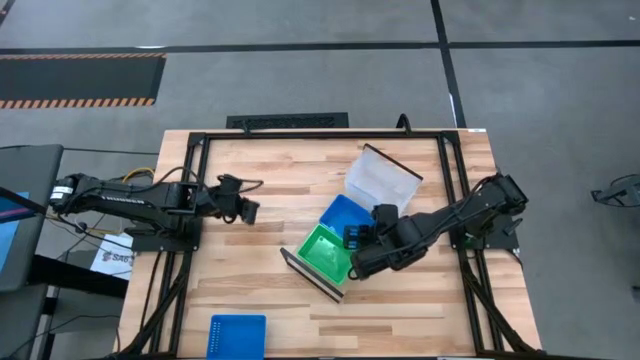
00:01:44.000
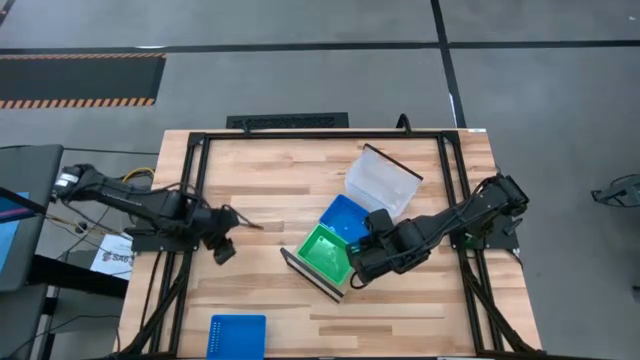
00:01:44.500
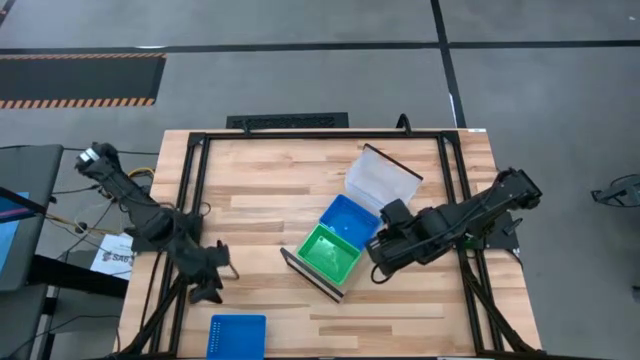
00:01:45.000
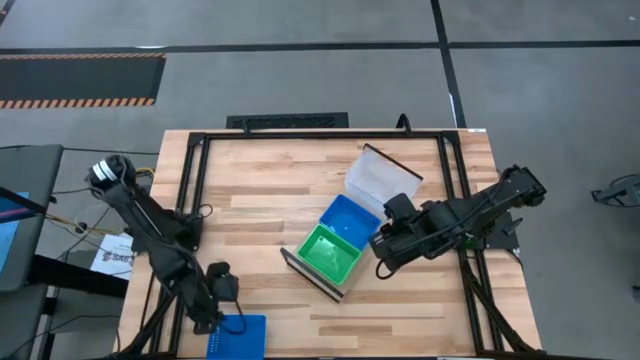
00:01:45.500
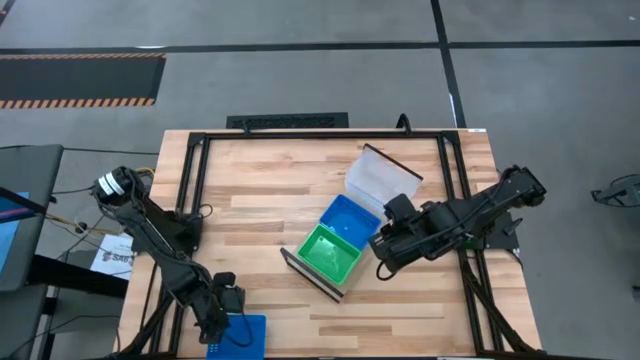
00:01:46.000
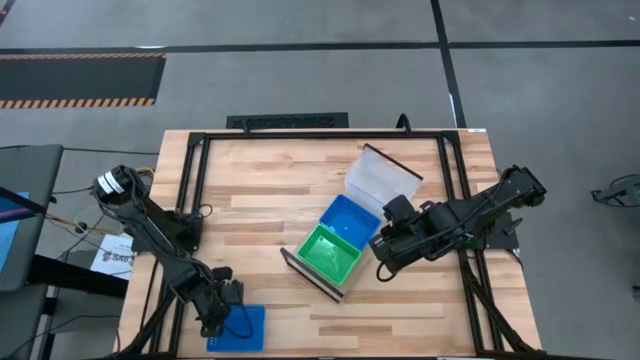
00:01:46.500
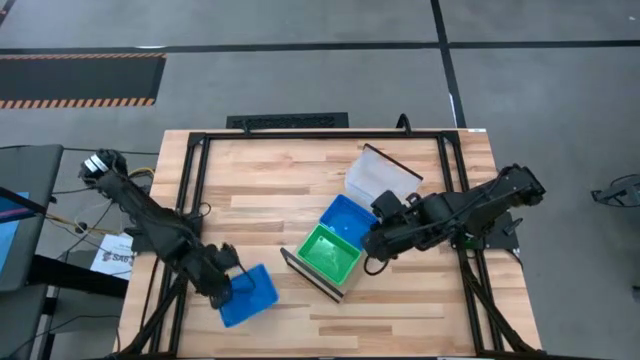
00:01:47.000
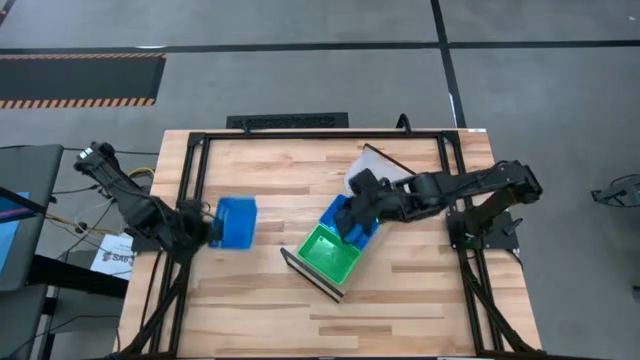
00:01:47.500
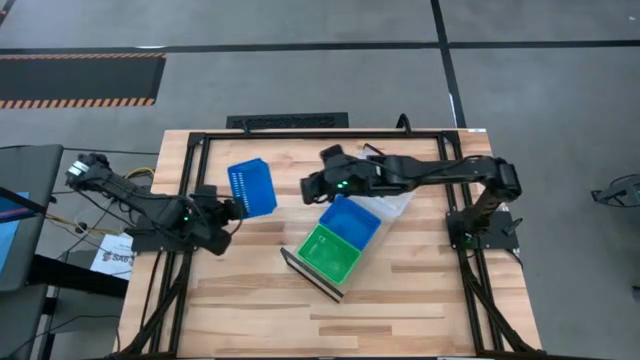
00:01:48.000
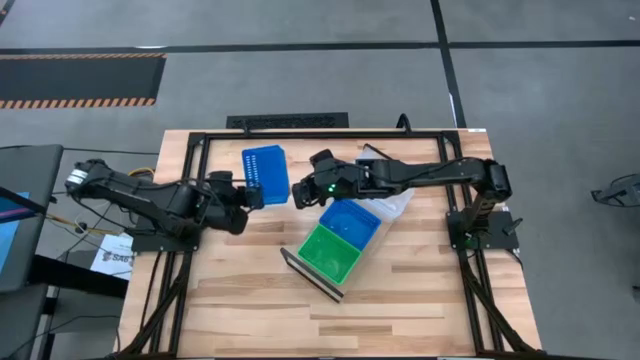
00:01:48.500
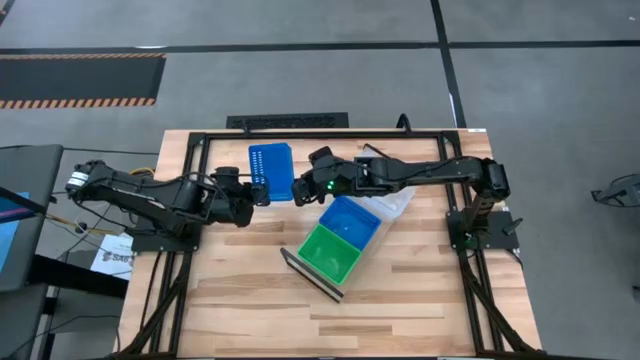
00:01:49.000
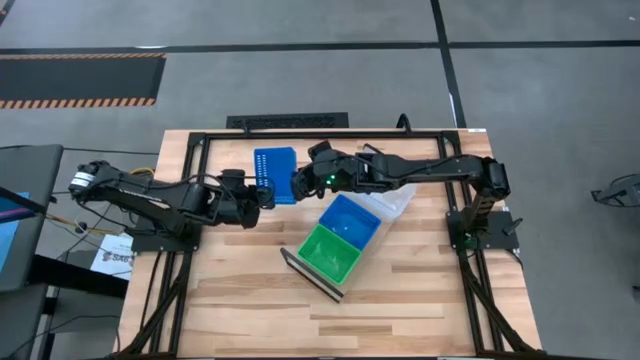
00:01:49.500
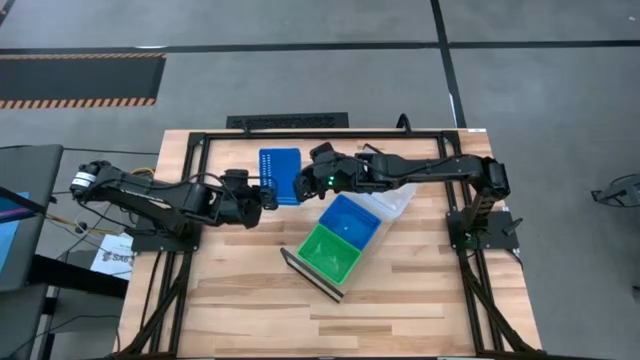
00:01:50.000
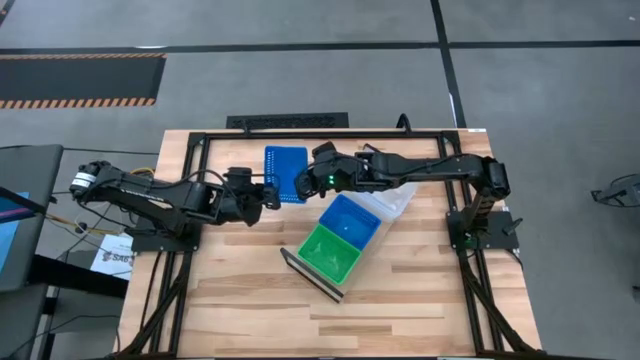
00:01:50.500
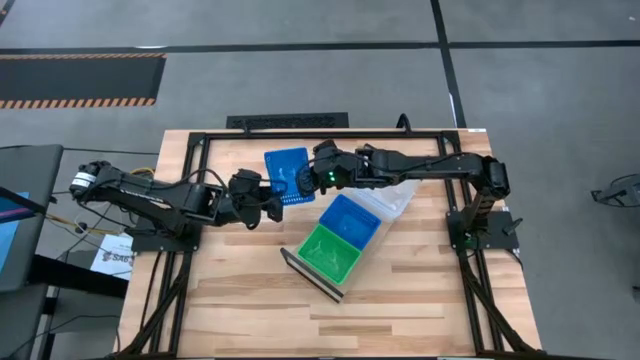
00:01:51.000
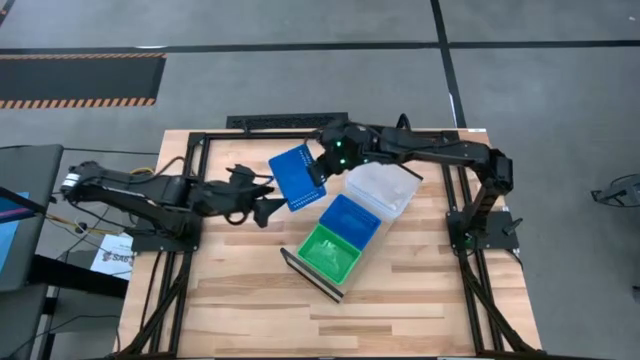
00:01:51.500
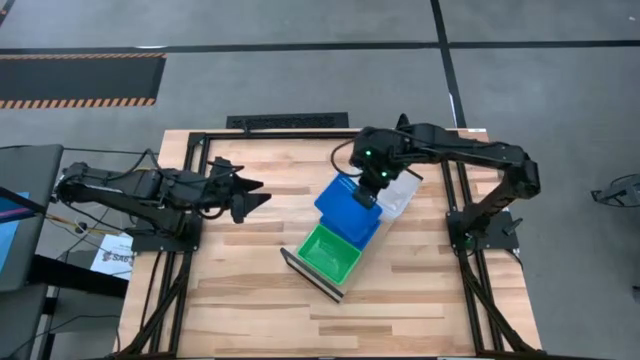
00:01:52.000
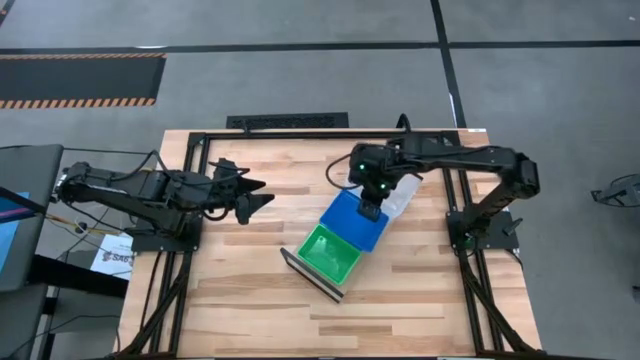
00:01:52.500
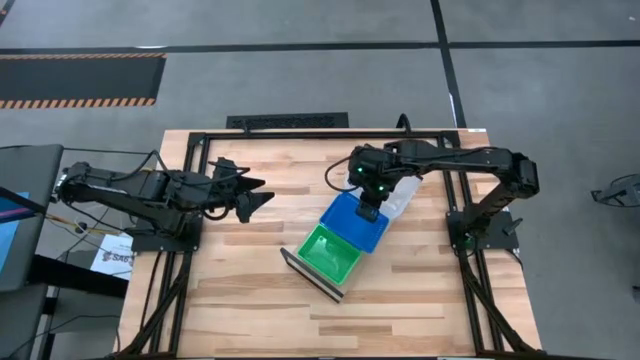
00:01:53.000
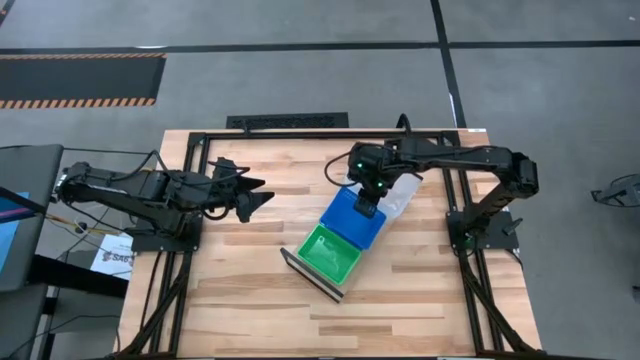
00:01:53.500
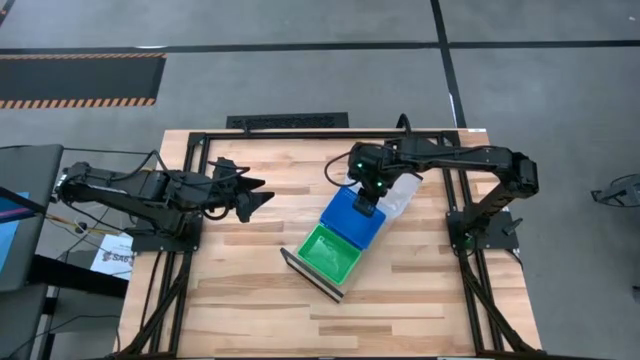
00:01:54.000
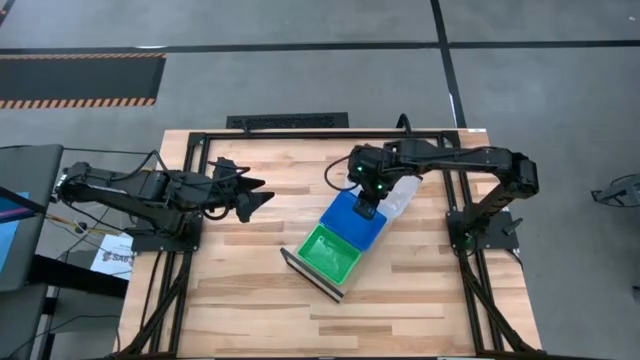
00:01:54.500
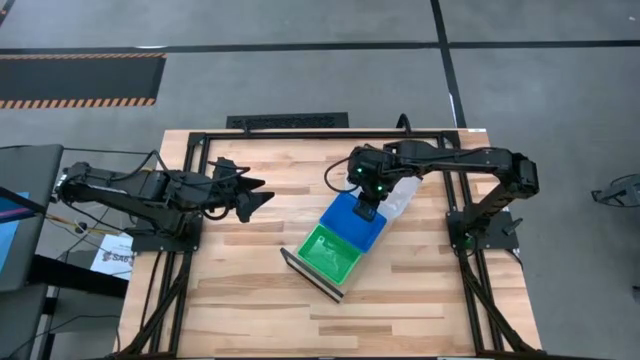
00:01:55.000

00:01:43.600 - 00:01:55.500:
Task: Stack baskets on shelf by color
Stack the blue bin on the other blue bins on the shelf

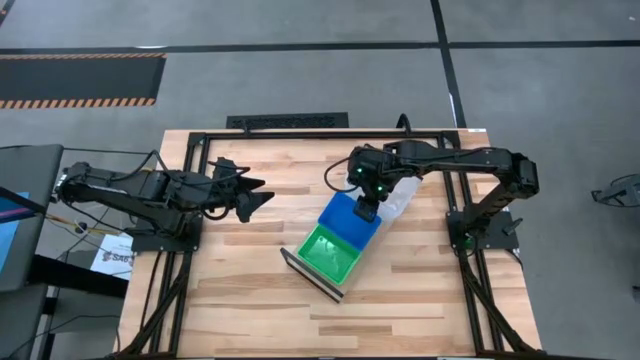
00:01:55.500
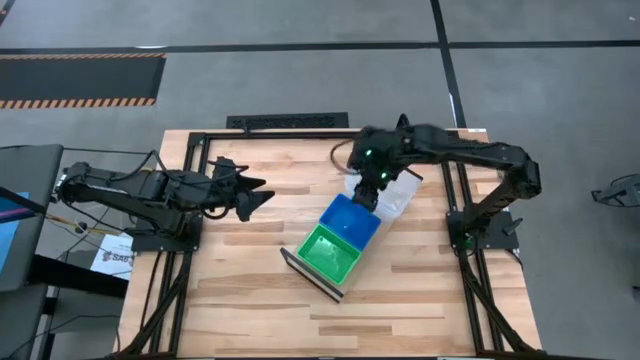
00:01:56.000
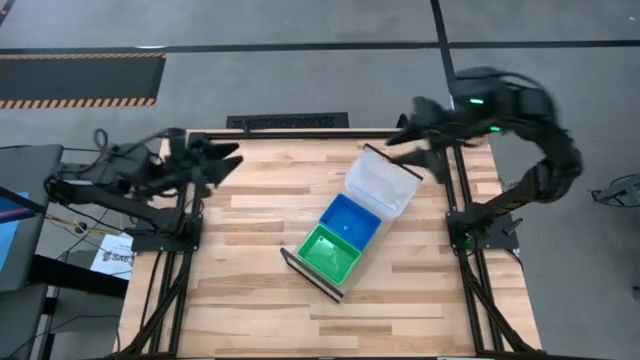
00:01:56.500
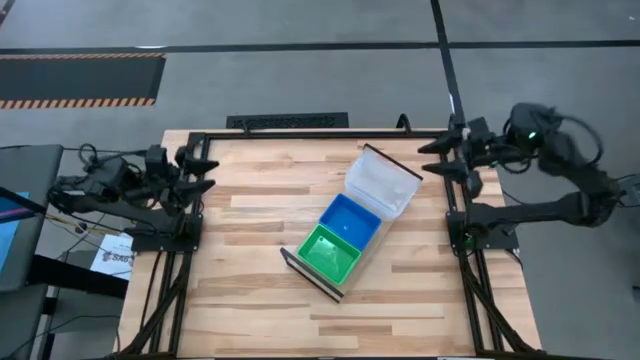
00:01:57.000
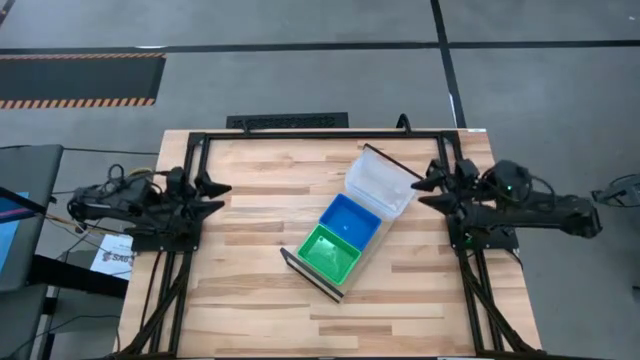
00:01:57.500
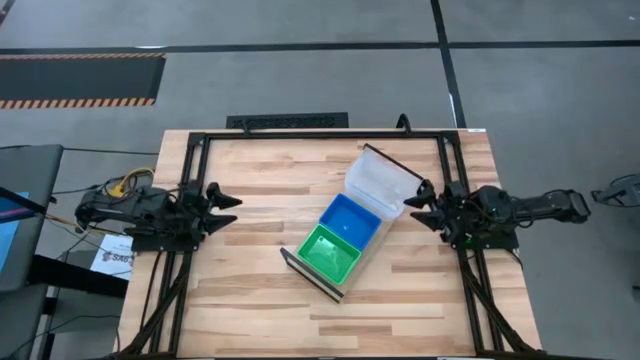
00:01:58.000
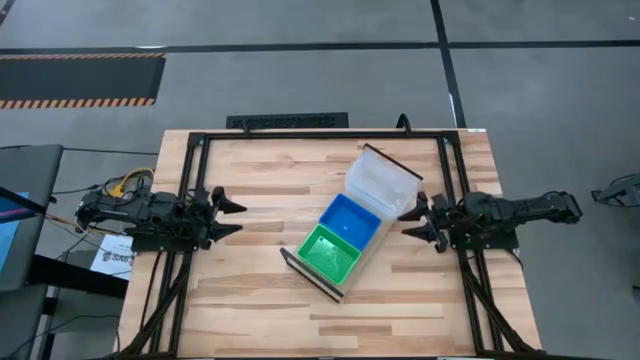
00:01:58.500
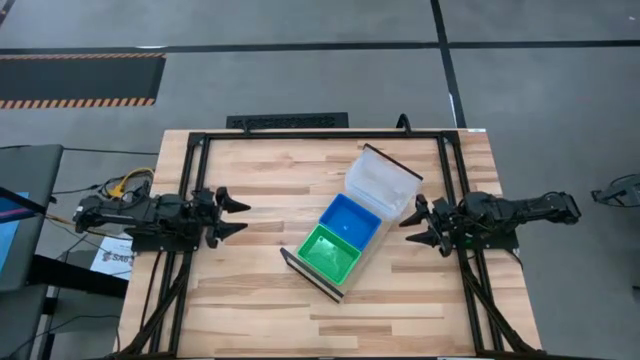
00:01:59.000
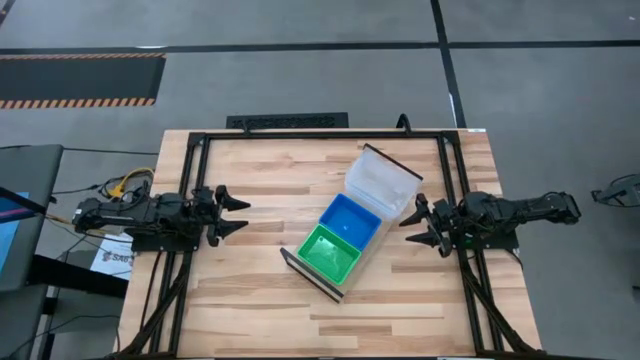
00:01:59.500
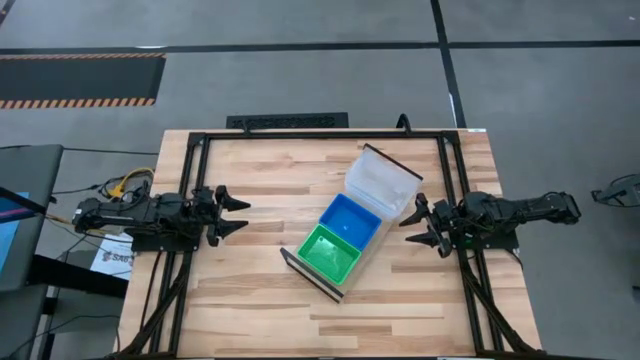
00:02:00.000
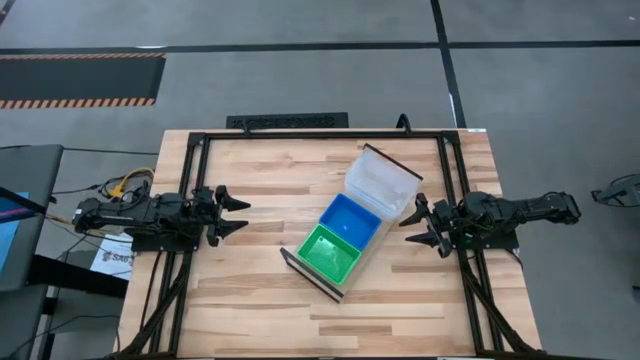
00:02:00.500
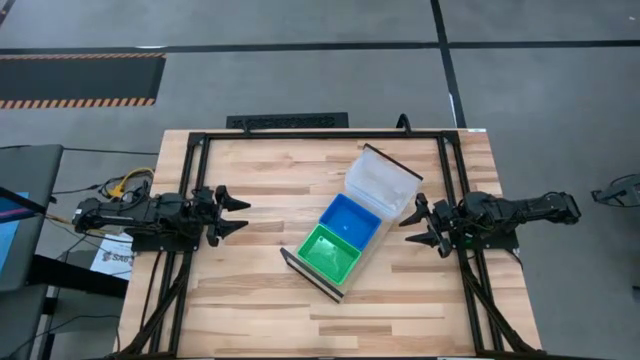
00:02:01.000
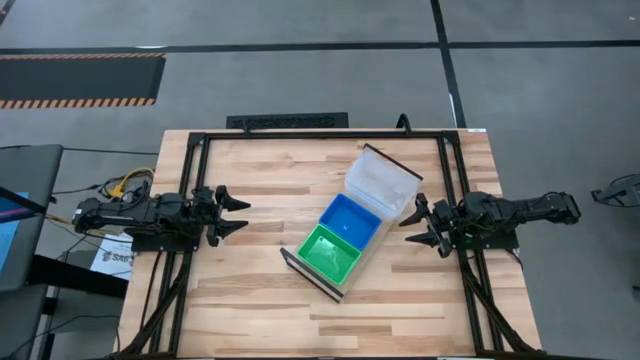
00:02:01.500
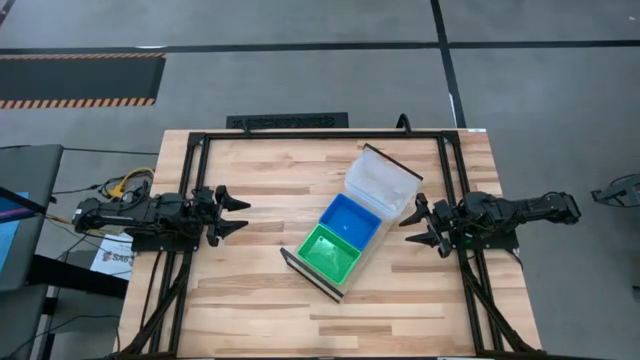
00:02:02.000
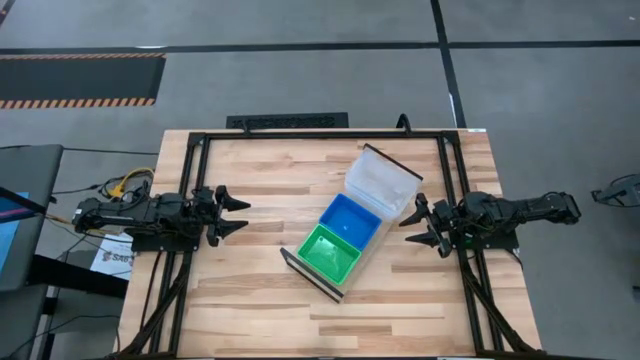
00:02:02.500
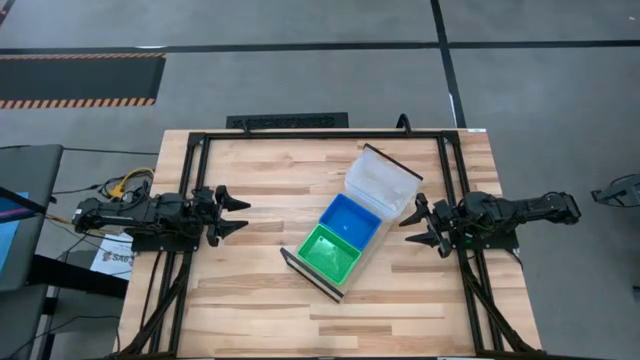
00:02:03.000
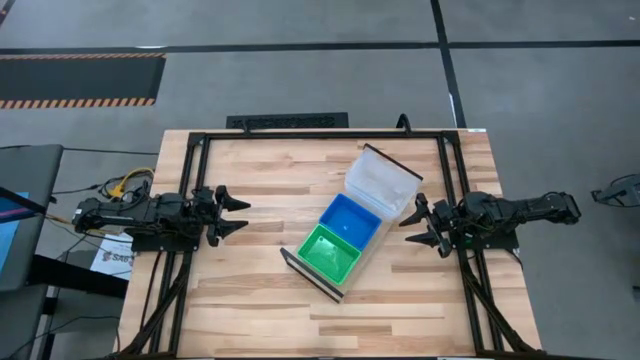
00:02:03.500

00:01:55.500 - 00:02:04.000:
Return to Home Position

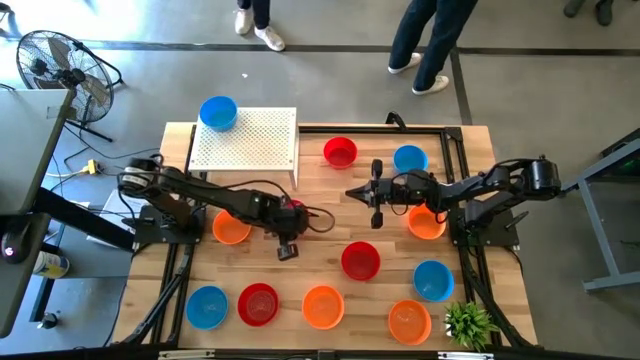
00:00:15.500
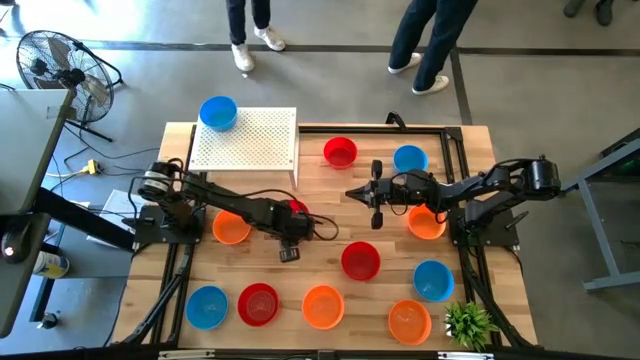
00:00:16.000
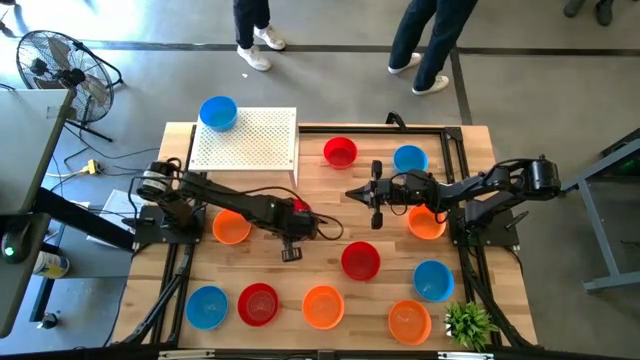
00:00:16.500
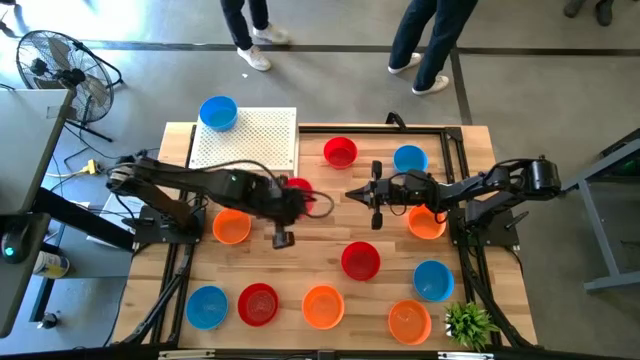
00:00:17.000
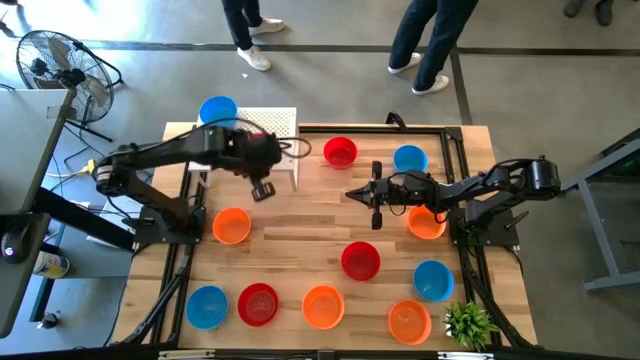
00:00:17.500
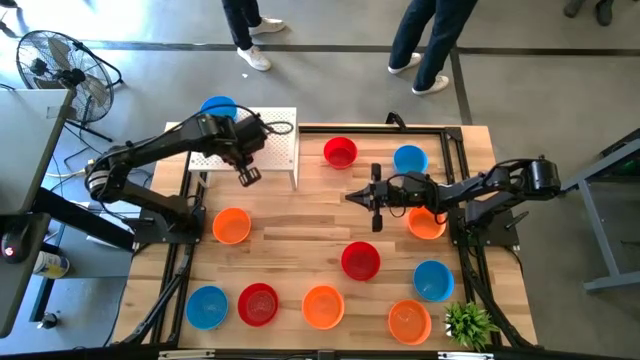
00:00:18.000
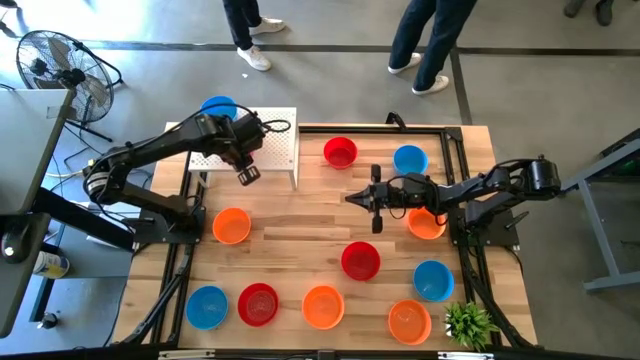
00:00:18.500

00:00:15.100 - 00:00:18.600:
Task: Pick & Place Mini bowls
Put the red bowl on the shelf
